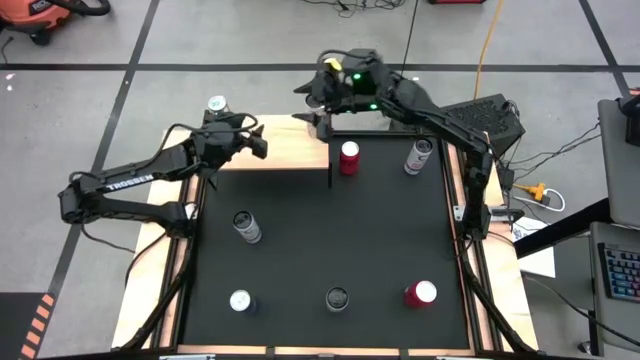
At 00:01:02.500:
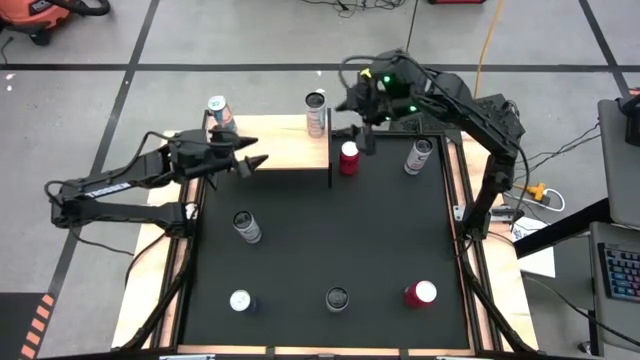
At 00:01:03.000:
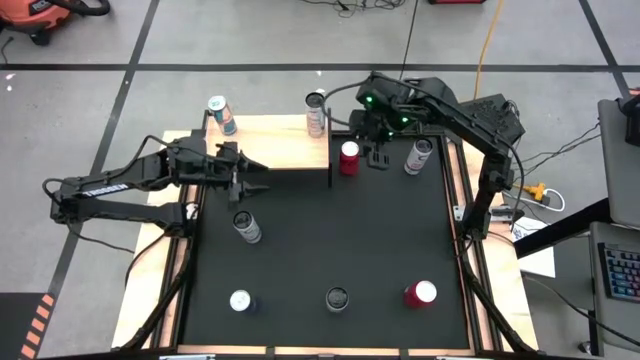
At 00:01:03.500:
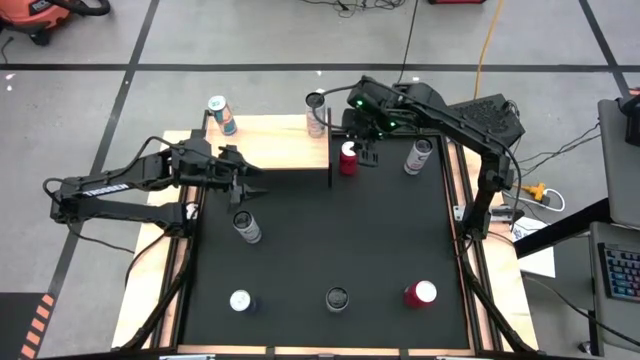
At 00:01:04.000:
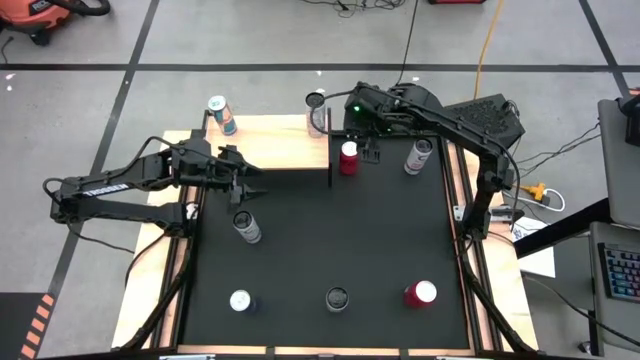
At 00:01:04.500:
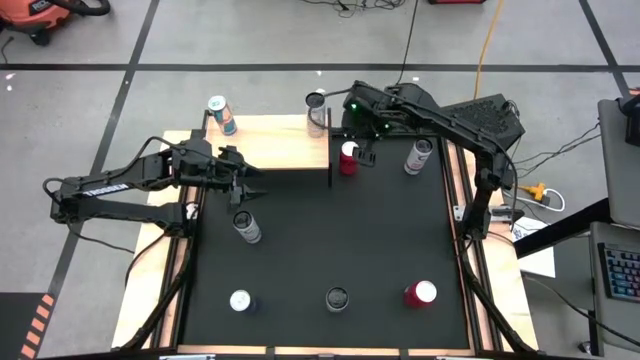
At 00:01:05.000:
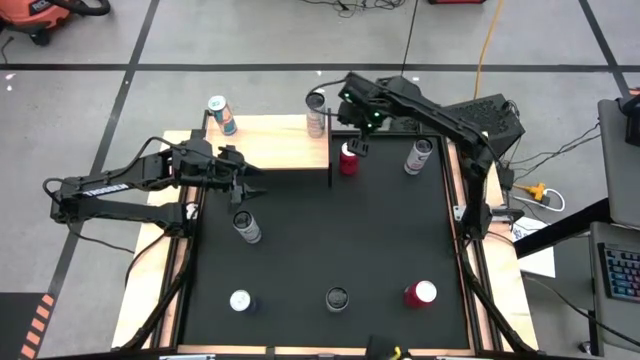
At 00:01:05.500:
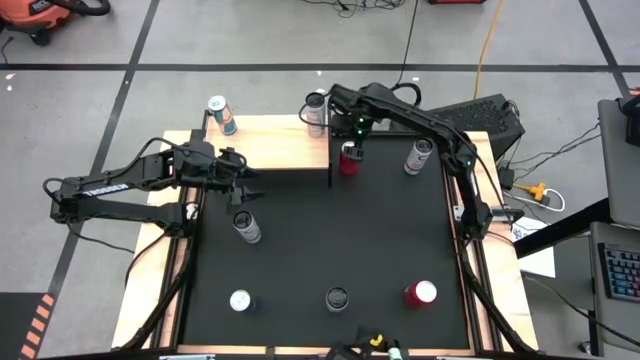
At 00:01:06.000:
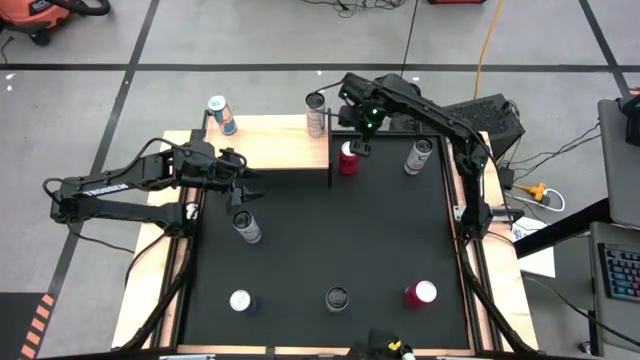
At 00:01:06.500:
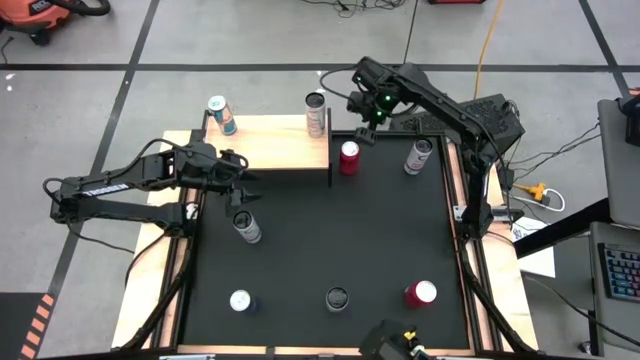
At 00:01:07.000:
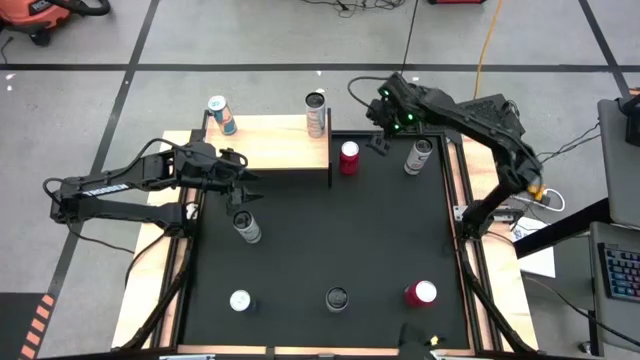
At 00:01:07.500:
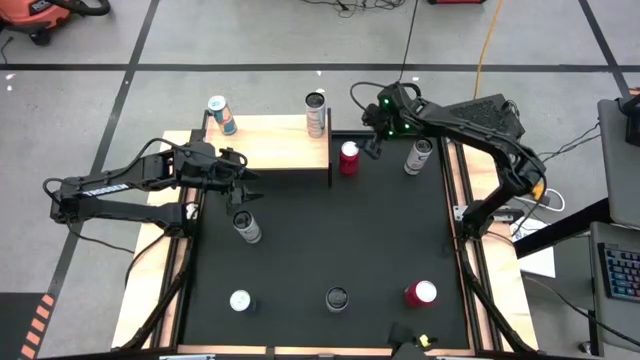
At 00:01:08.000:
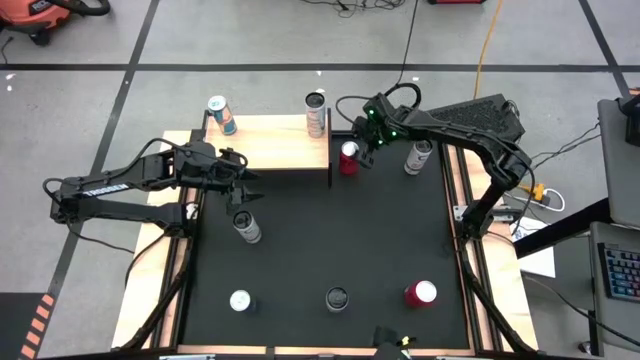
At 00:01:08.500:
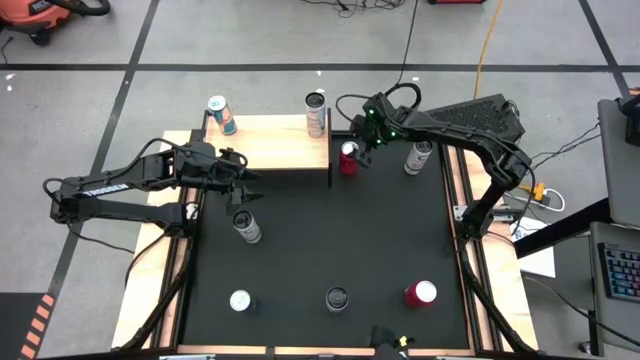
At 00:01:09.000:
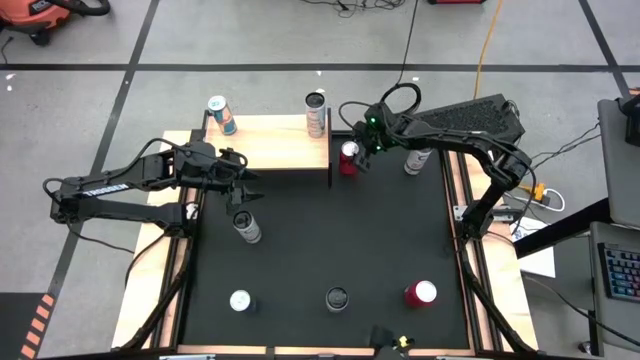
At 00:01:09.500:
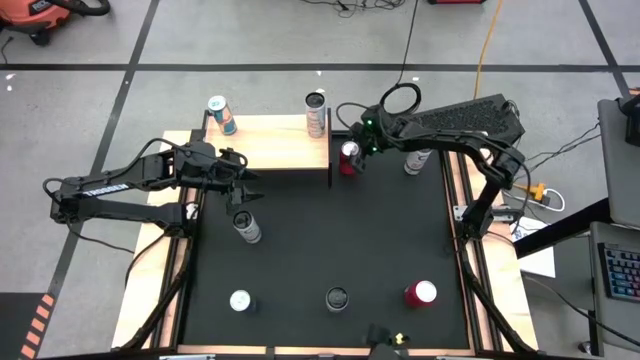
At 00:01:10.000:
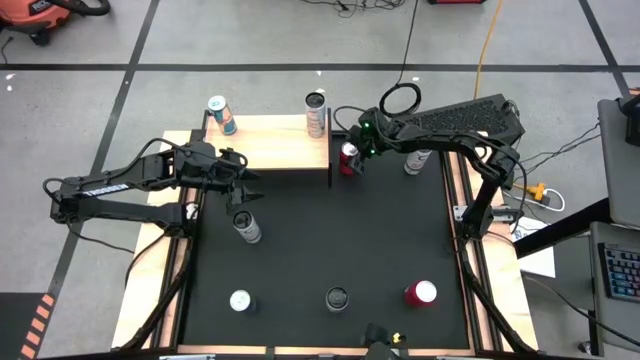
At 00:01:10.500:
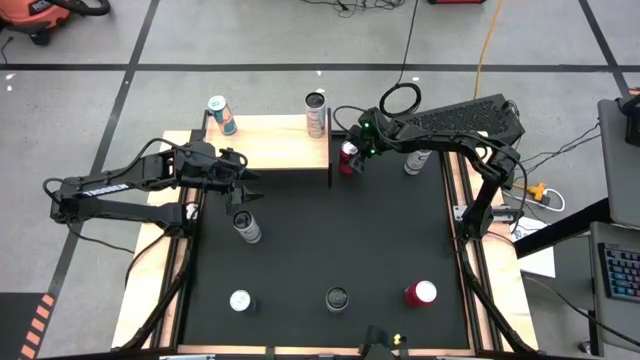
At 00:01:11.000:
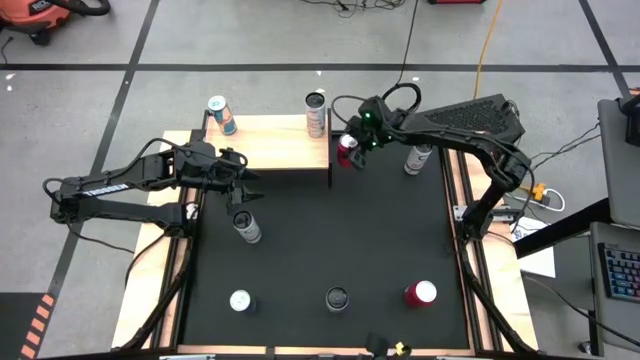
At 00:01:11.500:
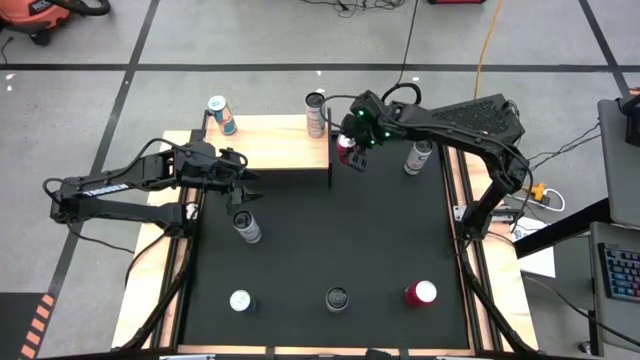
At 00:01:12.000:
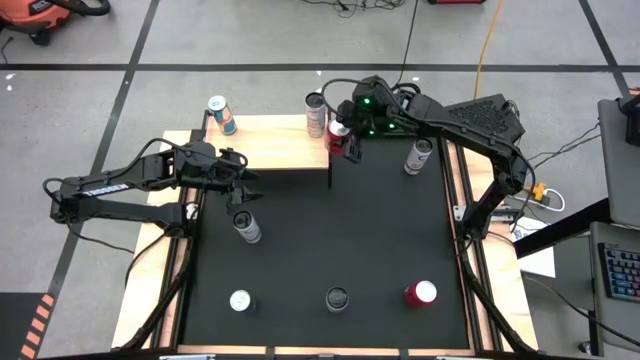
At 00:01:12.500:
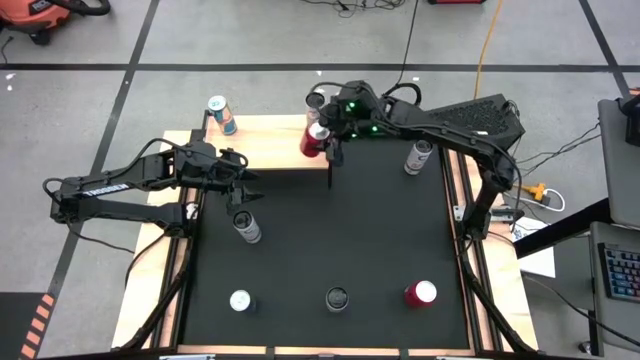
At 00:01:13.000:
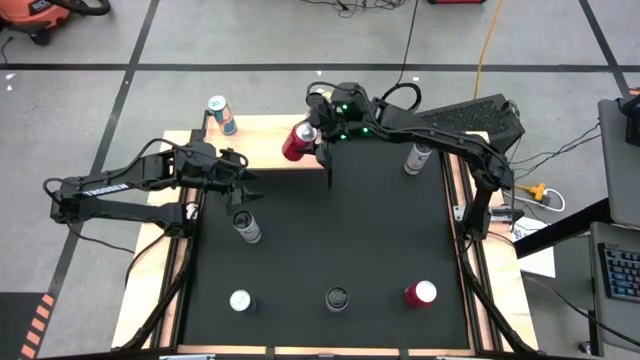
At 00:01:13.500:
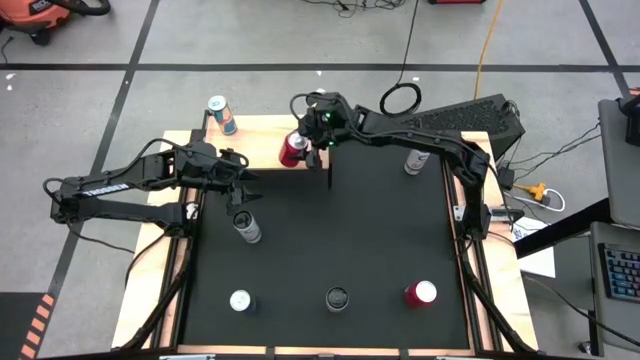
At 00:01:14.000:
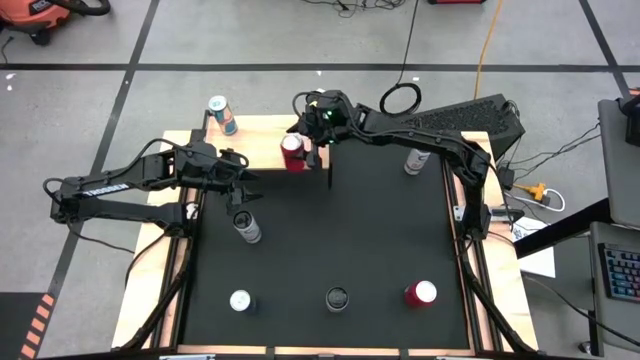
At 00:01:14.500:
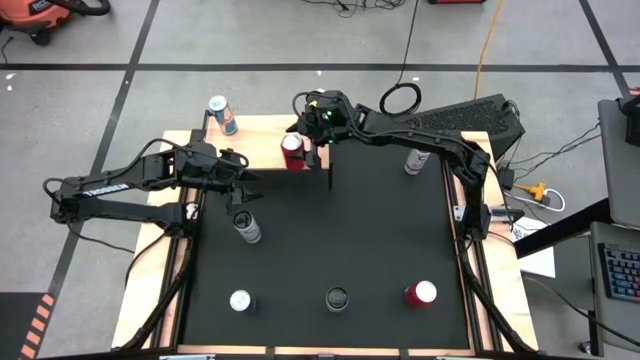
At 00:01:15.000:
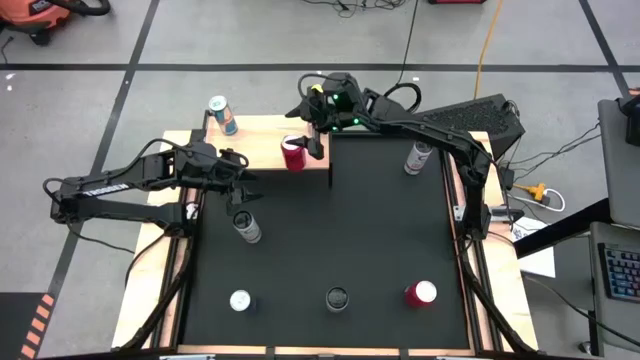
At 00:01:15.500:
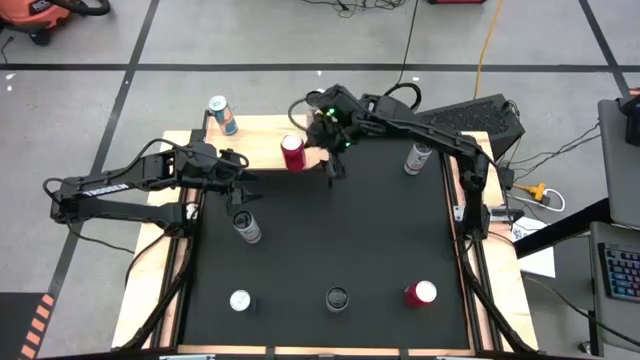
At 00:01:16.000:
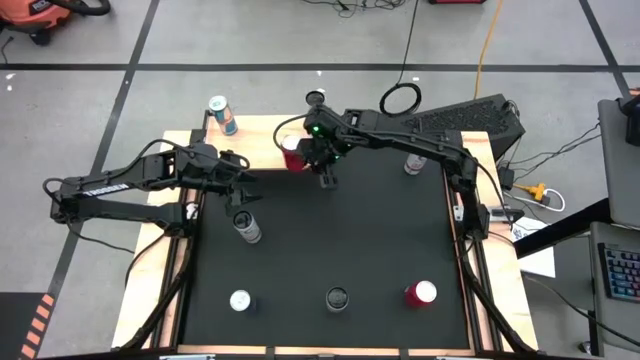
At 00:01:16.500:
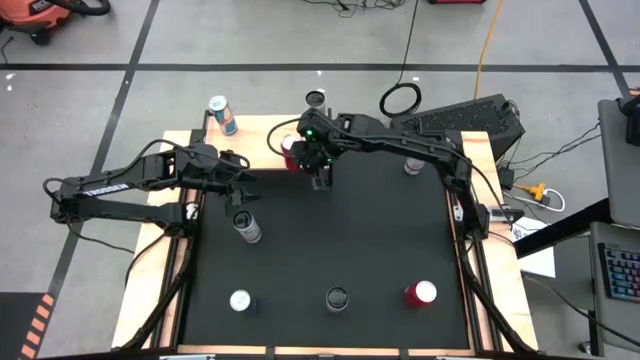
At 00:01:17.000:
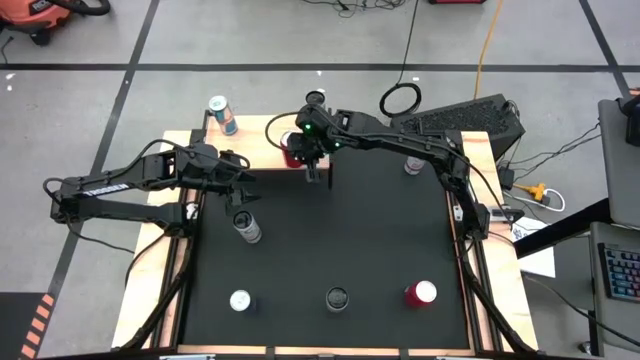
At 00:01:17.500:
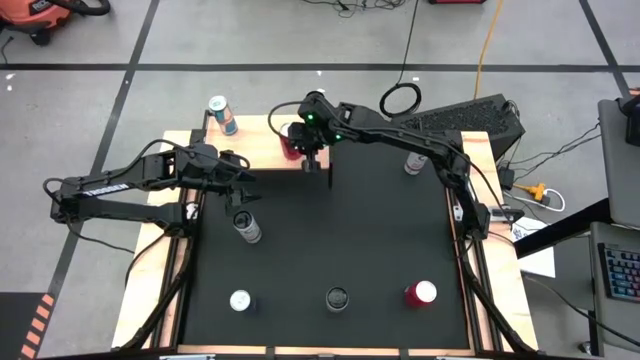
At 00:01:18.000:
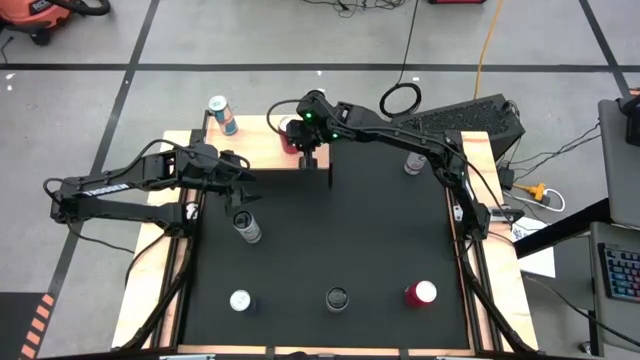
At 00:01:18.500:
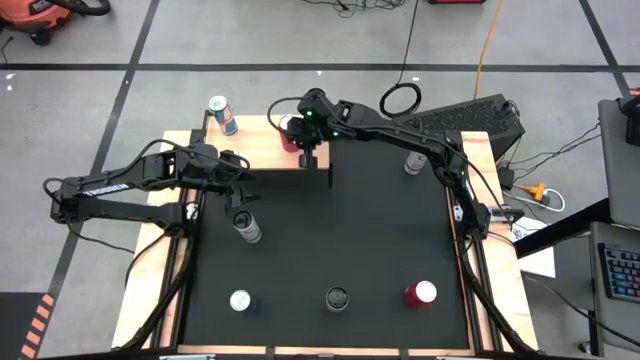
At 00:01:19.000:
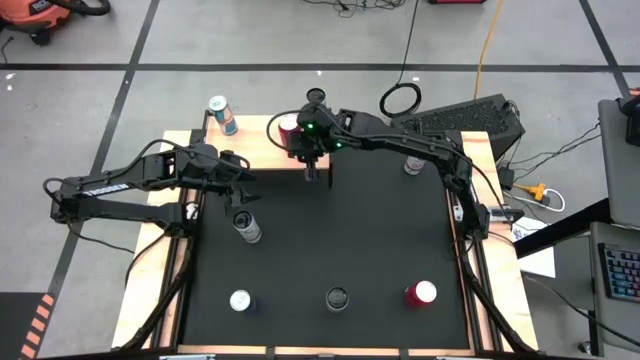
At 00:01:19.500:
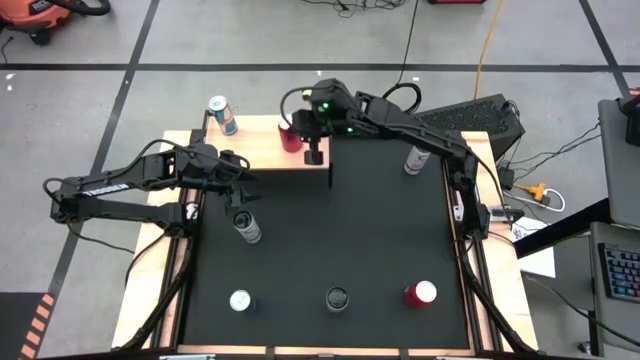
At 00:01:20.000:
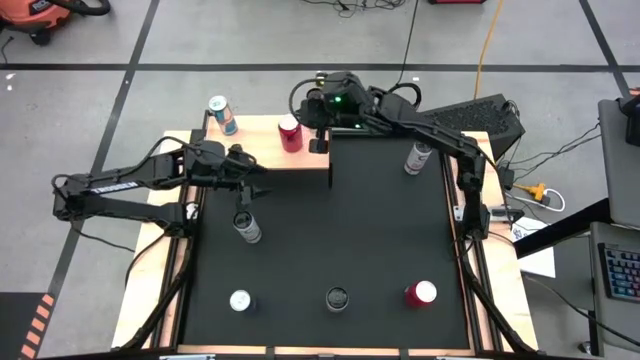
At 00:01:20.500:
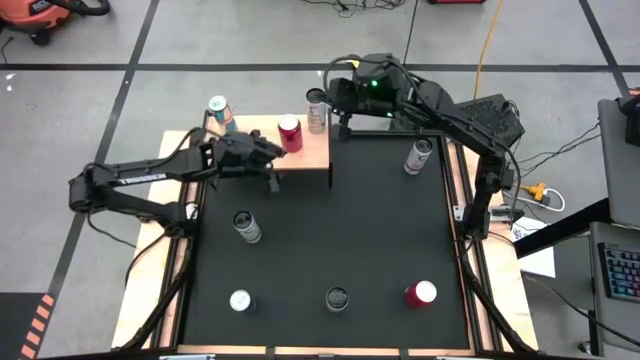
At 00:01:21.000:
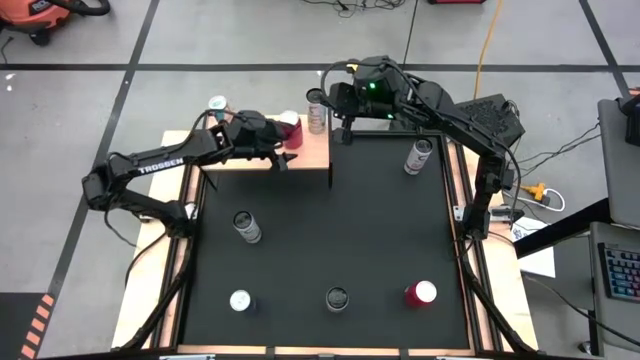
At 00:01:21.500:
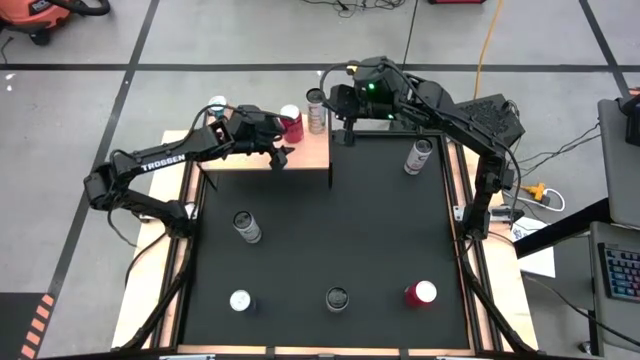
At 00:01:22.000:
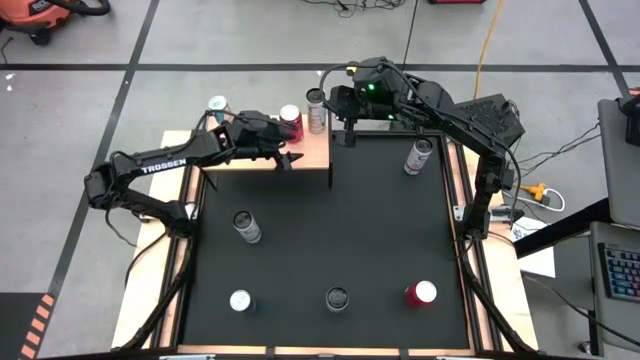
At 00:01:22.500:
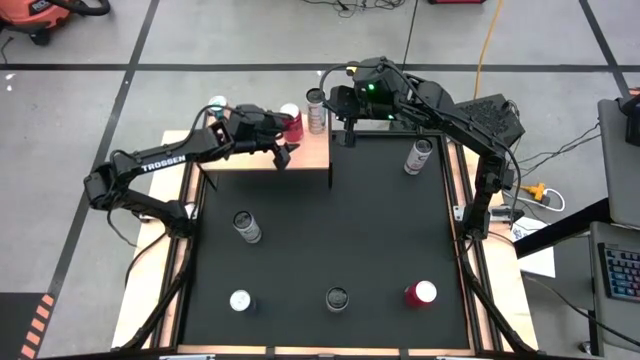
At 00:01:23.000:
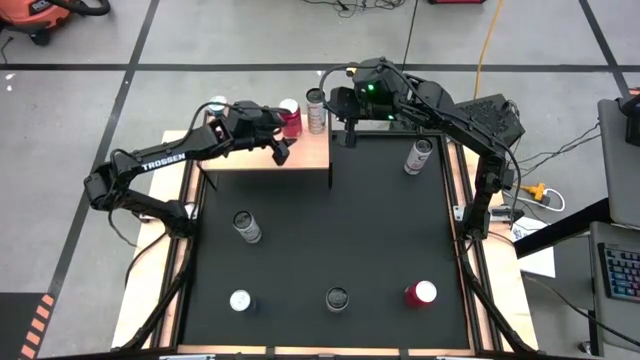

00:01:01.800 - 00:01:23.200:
Task: Place canned beverage on shelf
Put the top red soda can on the shelf
